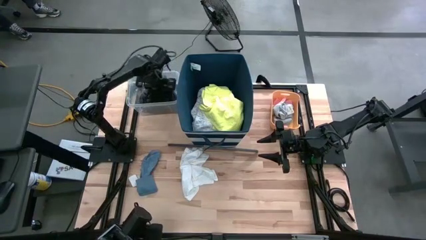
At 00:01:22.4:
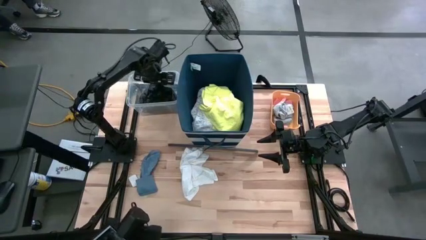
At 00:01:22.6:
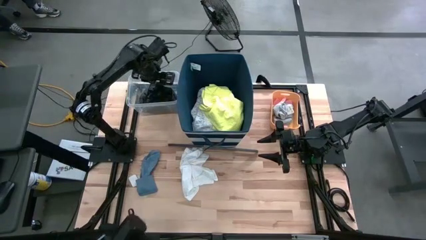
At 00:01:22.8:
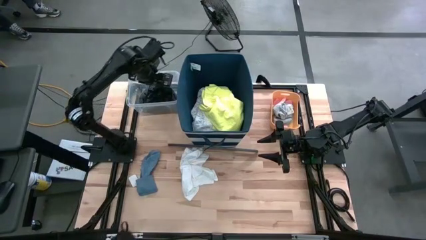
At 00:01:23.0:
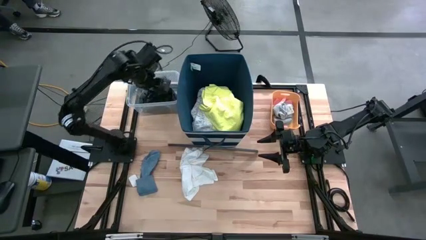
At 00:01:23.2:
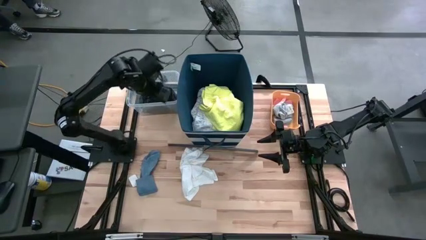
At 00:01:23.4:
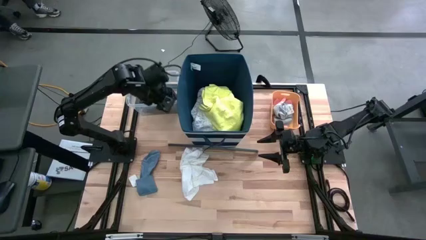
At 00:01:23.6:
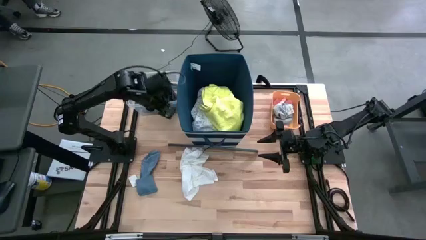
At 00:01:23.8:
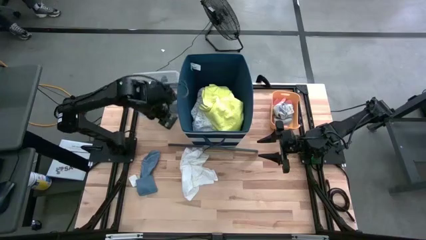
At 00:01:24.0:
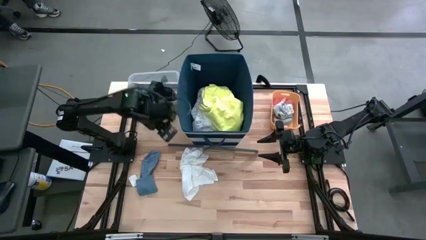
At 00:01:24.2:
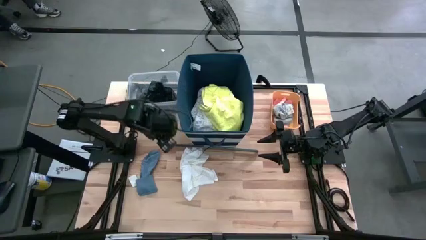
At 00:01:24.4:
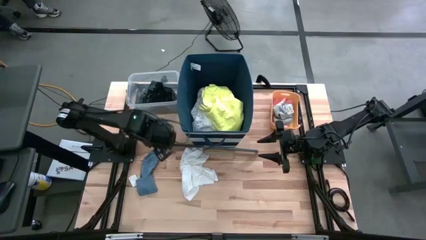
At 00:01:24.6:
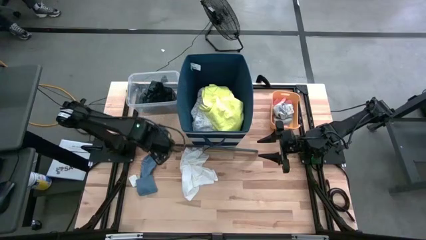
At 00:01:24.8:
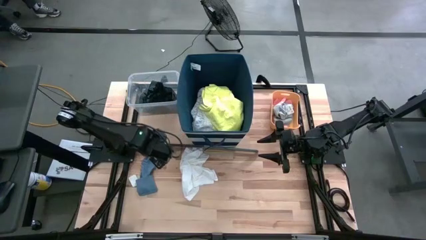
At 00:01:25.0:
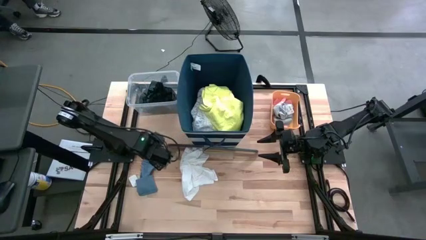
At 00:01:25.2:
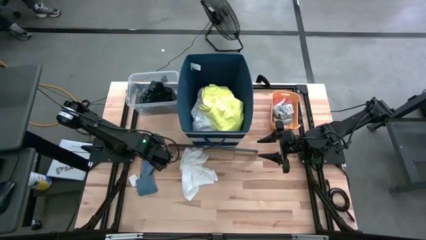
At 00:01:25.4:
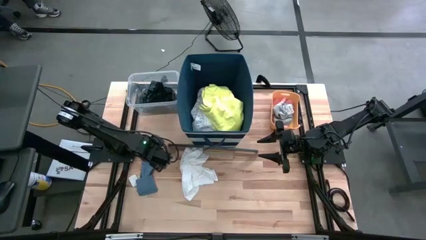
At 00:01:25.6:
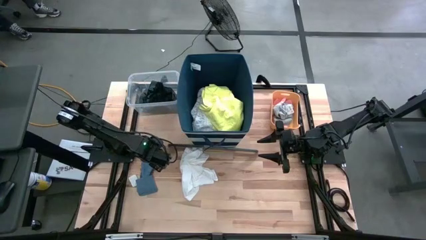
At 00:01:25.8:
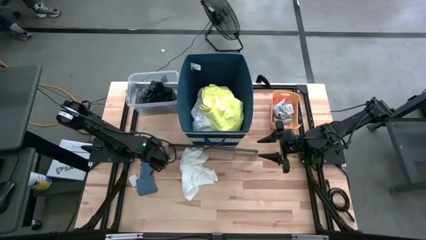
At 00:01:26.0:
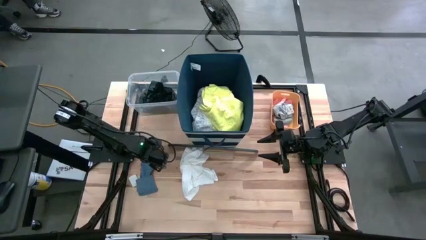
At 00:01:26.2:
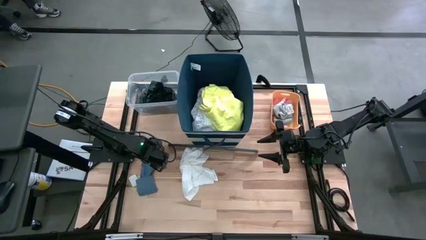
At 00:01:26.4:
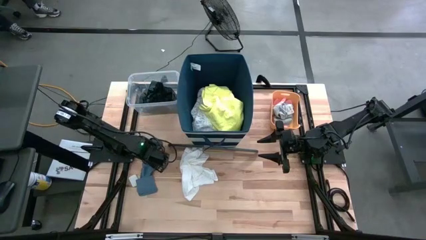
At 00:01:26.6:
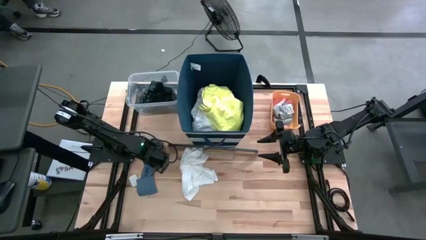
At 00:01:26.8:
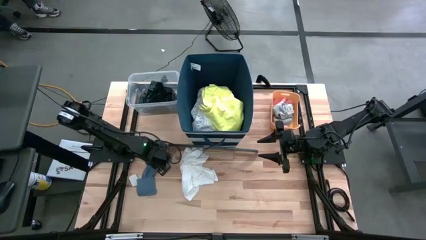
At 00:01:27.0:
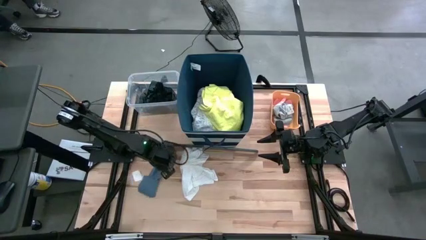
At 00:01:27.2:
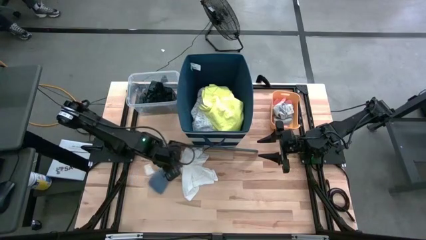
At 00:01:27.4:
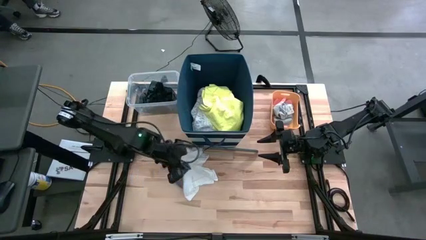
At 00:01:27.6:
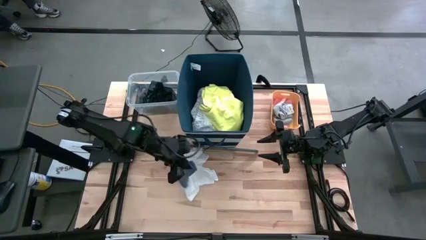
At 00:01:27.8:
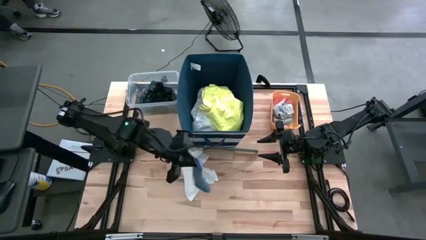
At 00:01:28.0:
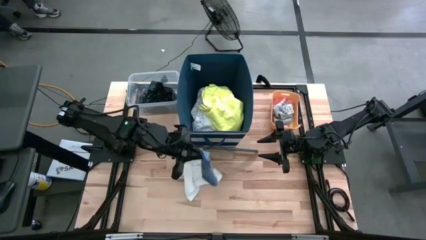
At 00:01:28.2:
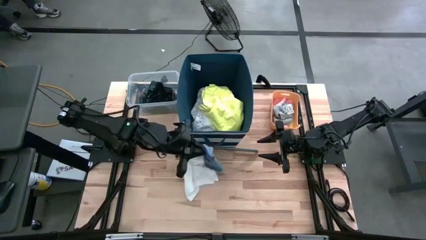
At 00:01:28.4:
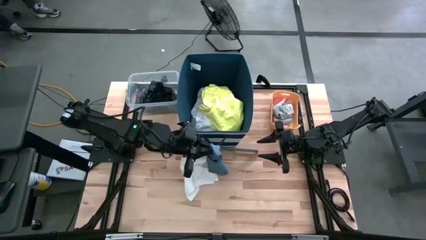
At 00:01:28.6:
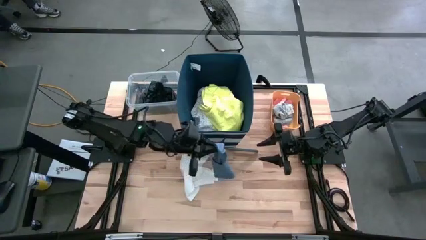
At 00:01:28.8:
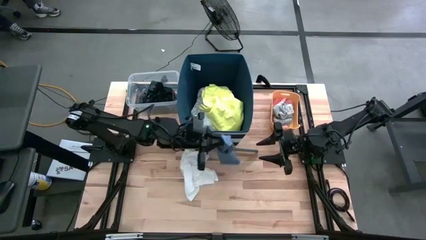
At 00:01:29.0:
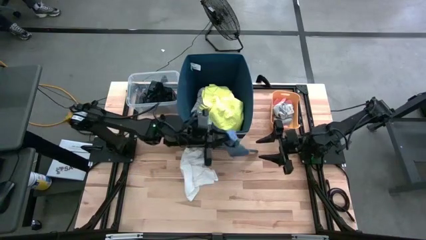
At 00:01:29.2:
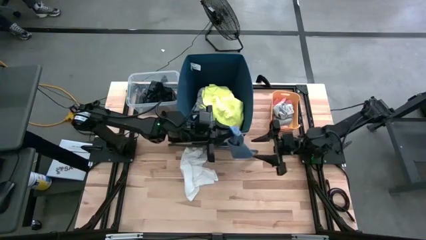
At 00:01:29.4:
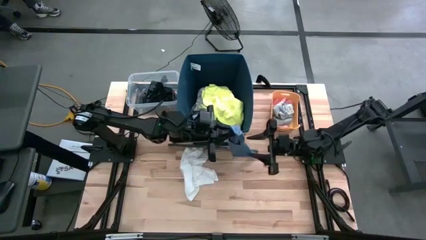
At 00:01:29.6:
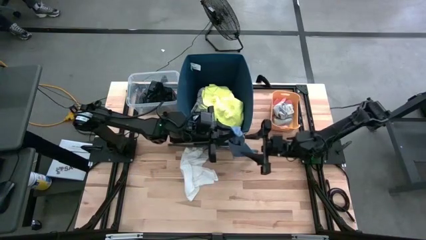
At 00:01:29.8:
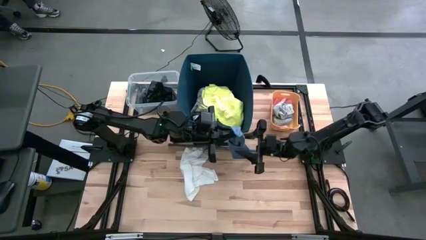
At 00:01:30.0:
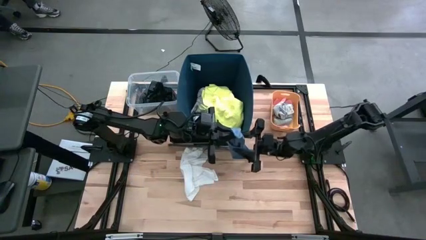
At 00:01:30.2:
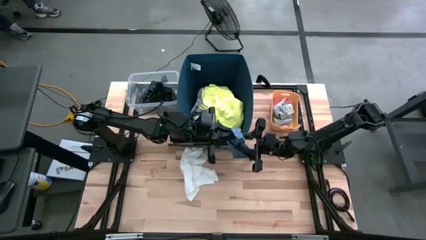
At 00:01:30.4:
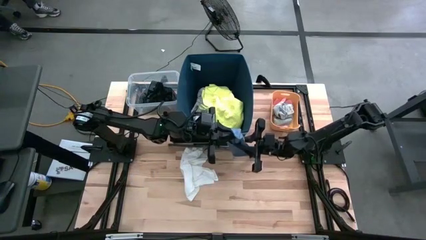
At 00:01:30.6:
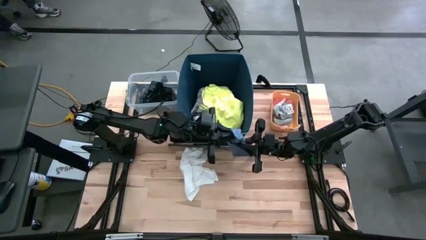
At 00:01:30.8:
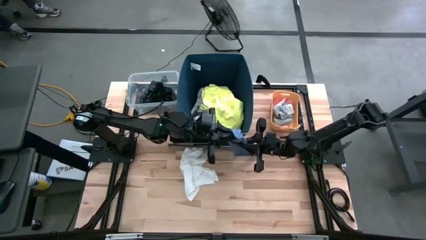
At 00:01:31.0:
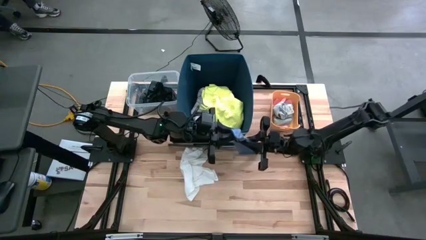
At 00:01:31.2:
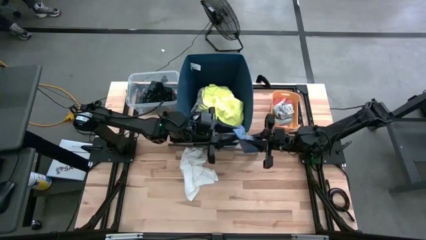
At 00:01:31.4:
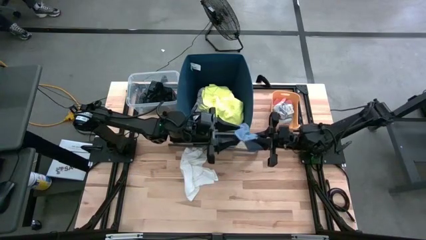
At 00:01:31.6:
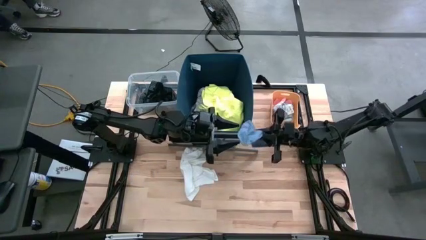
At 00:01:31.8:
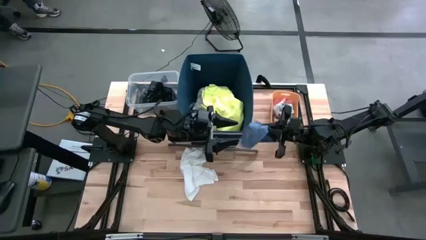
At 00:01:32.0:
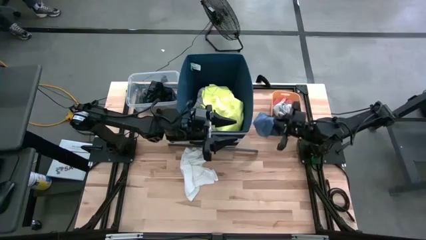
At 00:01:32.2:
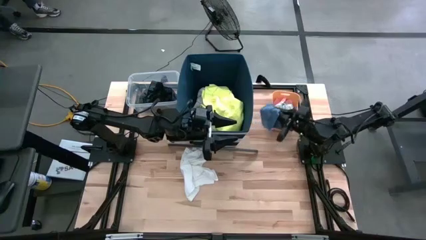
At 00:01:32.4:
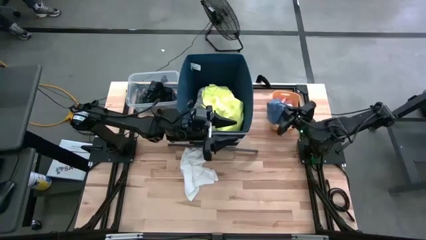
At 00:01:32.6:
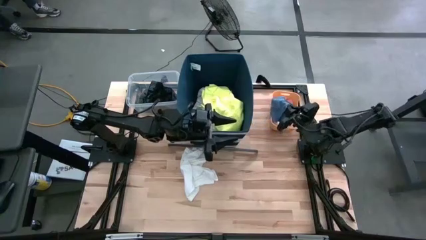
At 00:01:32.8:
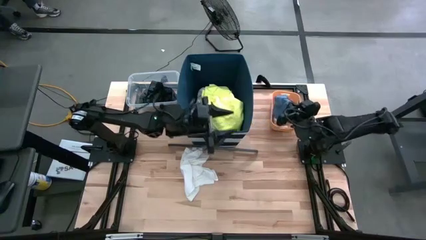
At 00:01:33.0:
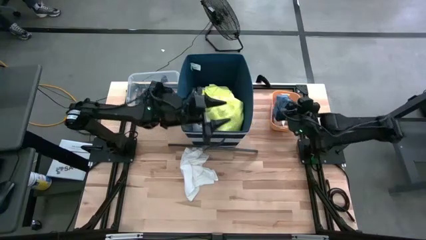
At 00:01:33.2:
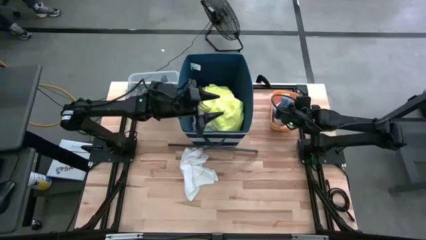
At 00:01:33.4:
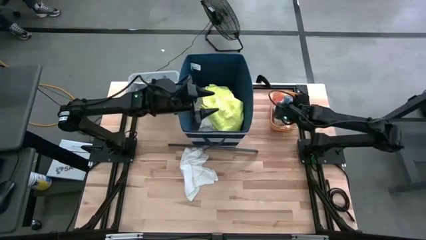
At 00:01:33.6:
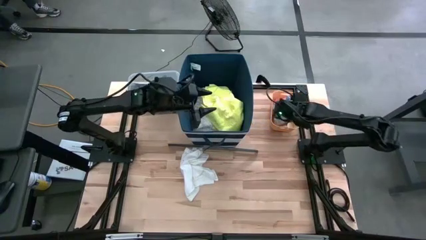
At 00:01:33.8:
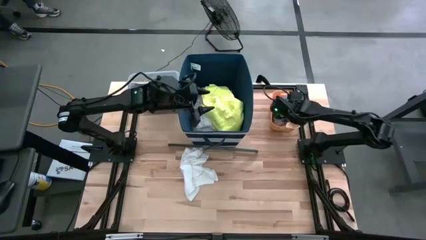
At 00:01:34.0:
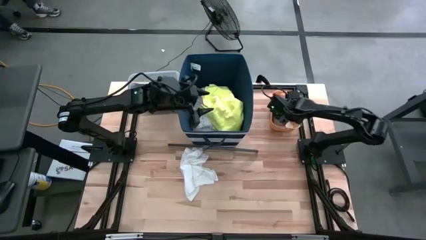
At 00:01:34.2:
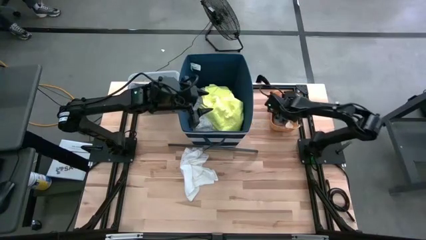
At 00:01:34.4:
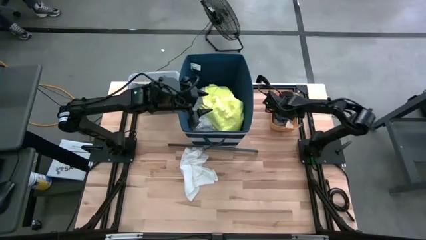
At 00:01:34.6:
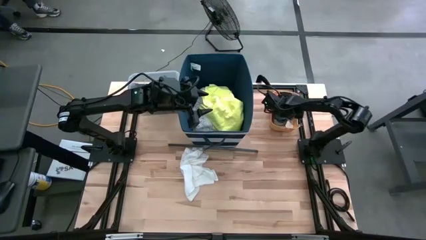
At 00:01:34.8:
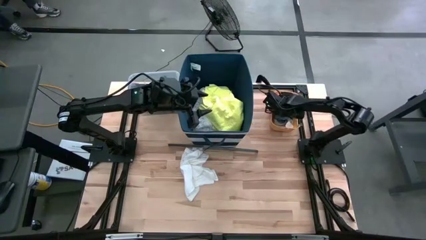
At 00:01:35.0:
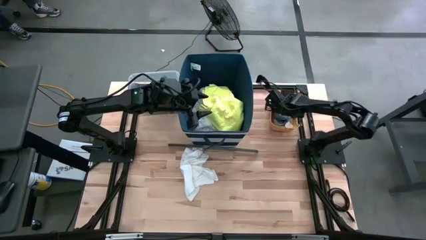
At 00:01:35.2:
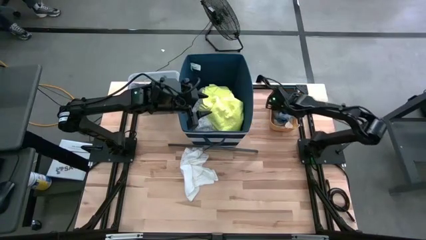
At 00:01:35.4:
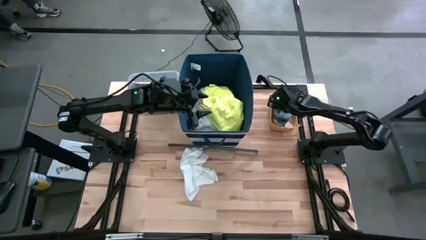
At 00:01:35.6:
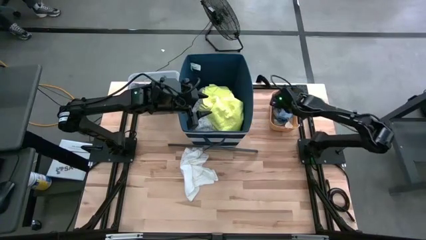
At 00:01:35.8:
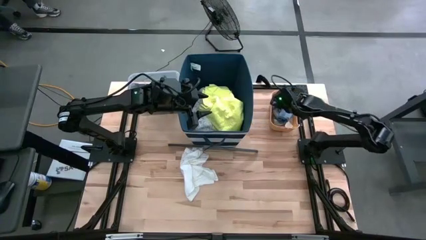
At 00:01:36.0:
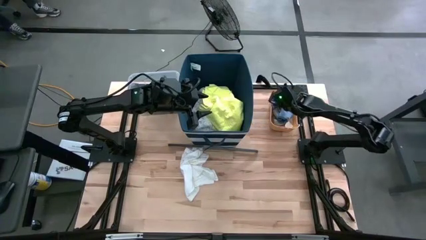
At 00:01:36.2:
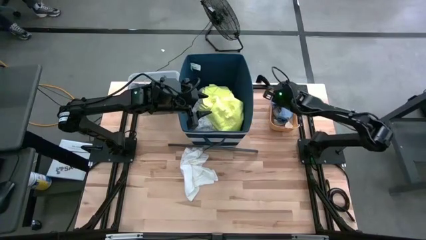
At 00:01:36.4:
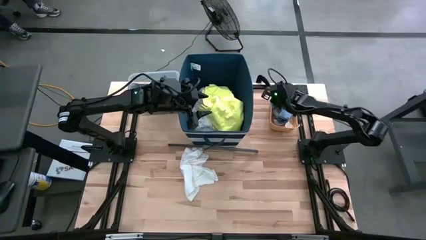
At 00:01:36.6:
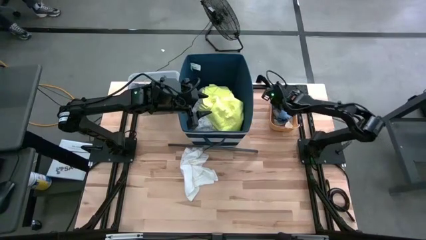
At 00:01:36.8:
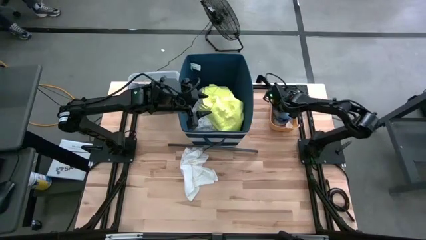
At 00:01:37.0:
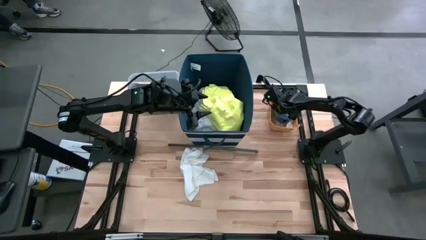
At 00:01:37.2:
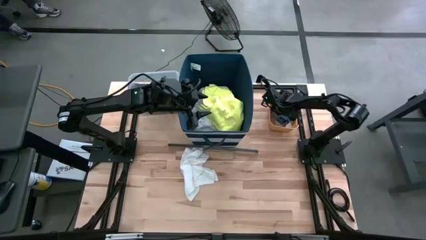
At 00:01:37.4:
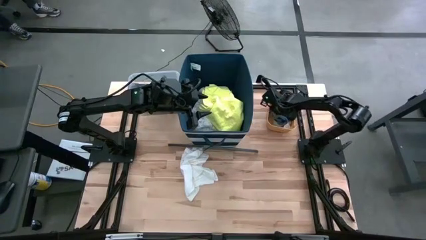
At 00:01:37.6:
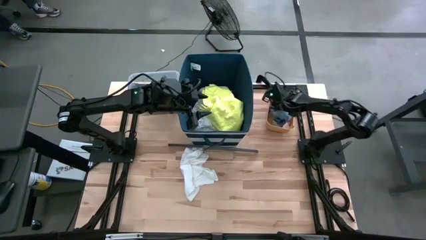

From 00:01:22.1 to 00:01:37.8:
Task: Pick & Place Cloths
Put the blue sock into the orange bin

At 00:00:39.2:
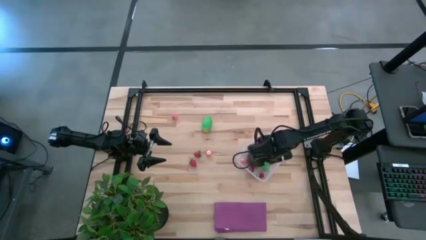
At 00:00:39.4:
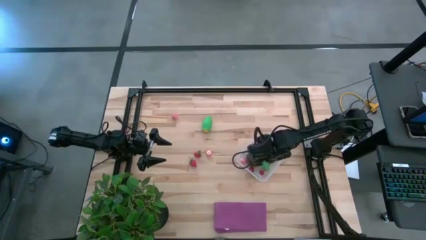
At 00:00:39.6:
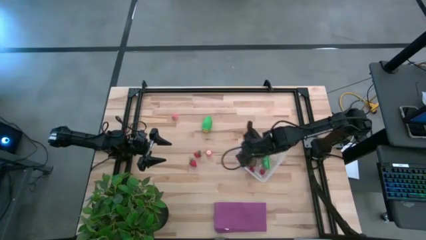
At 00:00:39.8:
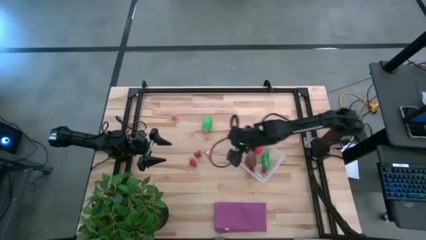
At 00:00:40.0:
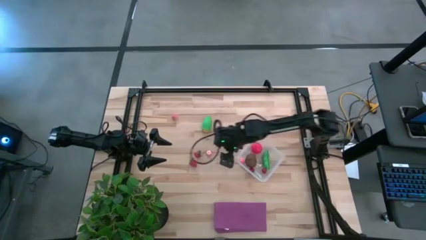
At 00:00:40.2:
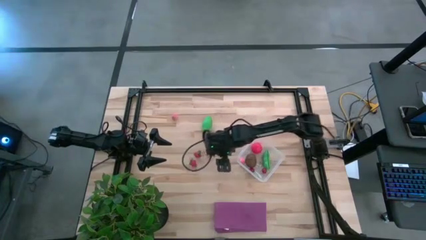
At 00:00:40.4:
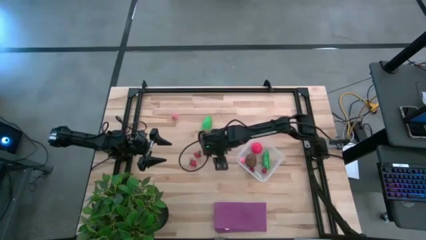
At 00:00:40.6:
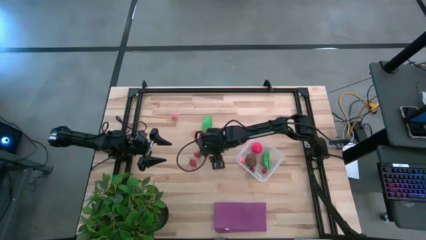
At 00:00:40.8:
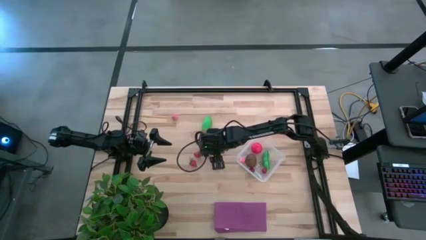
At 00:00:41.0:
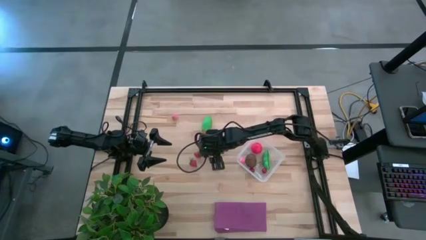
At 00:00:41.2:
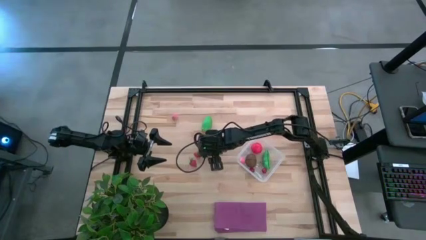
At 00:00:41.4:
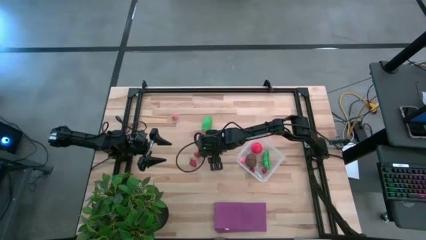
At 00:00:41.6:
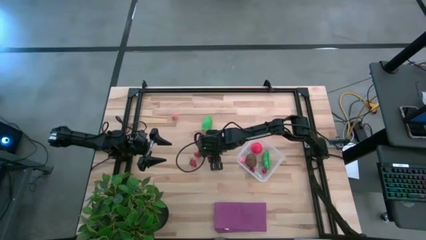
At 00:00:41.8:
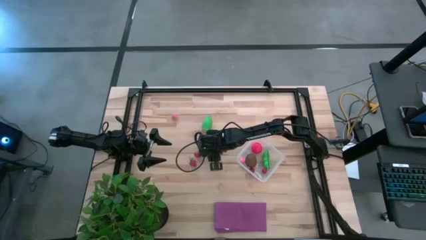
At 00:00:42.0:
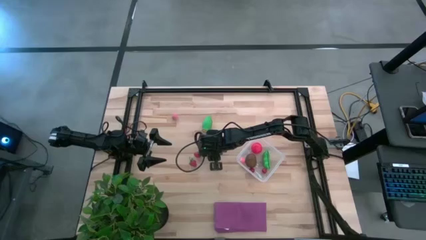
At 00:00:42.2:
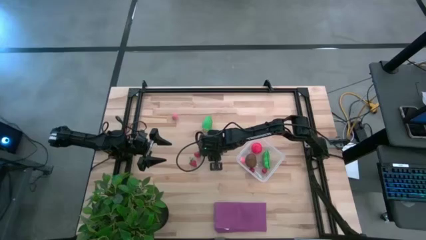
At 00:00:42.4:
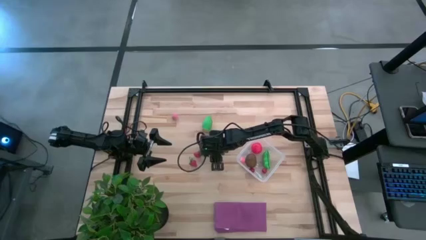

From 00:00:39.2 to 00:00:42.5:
Task: Pick and placing Produce into tupperware
Put the bottom pink peach into the transparent bin
